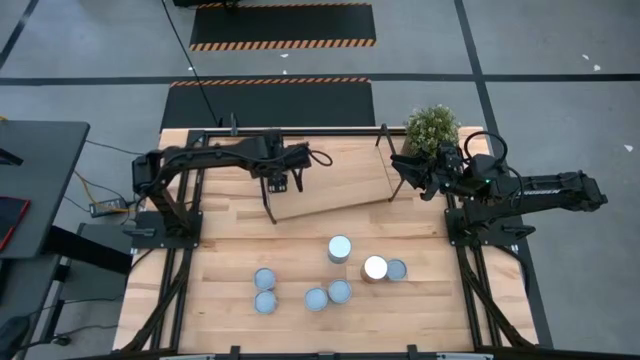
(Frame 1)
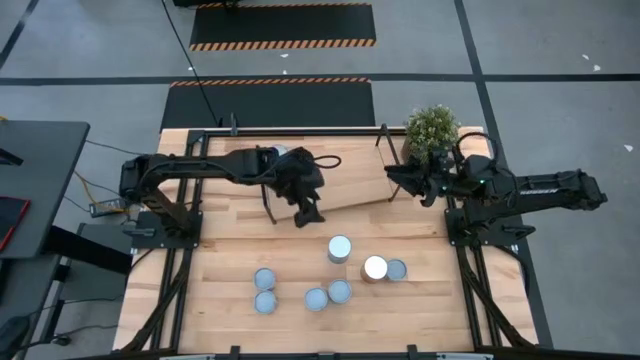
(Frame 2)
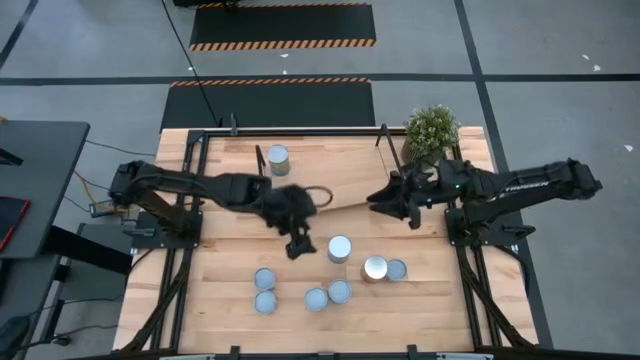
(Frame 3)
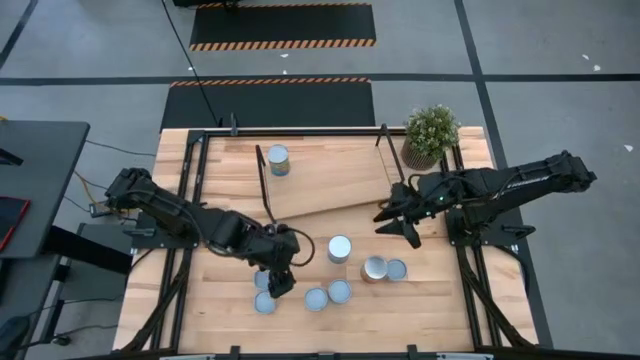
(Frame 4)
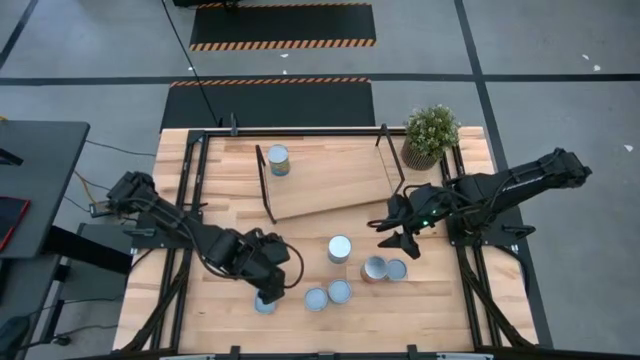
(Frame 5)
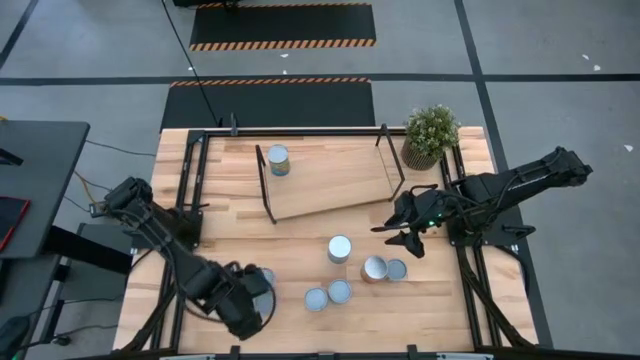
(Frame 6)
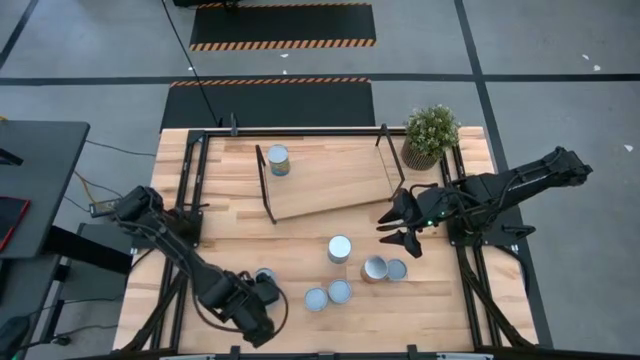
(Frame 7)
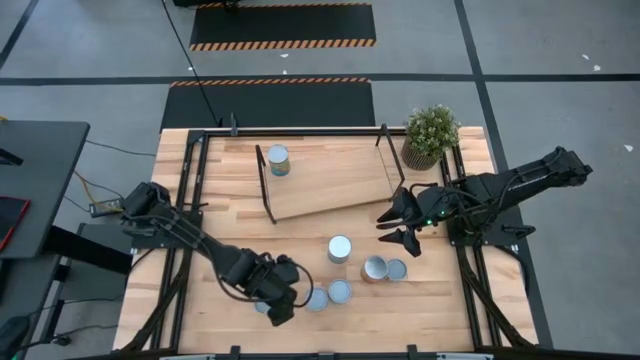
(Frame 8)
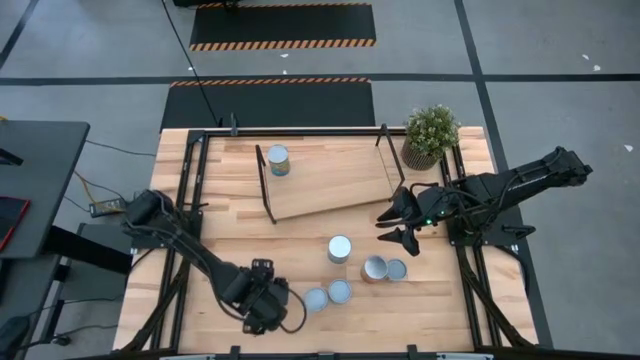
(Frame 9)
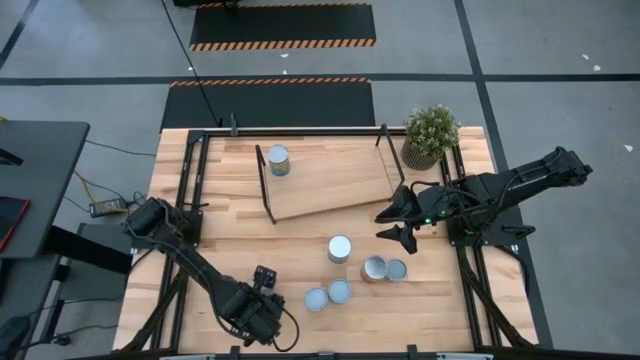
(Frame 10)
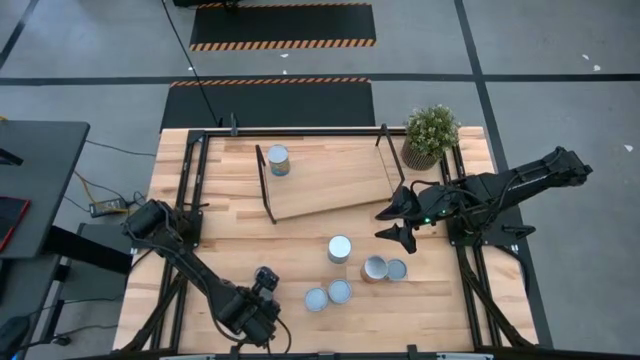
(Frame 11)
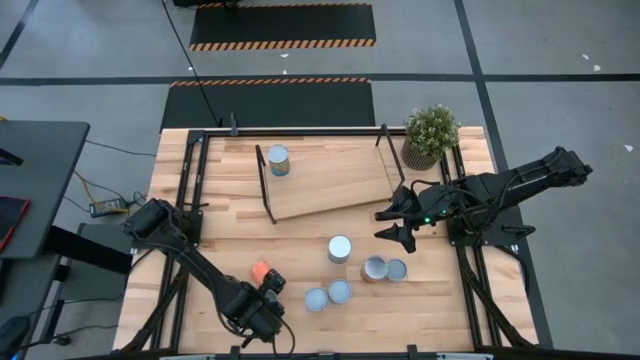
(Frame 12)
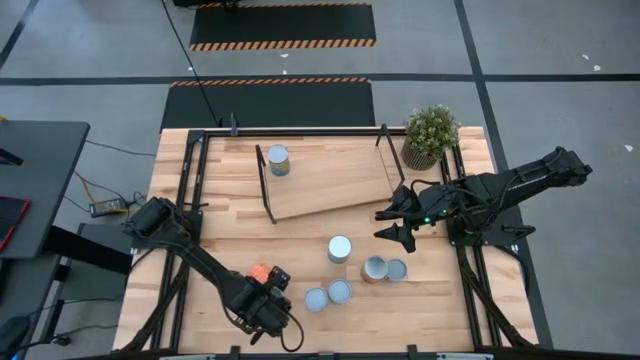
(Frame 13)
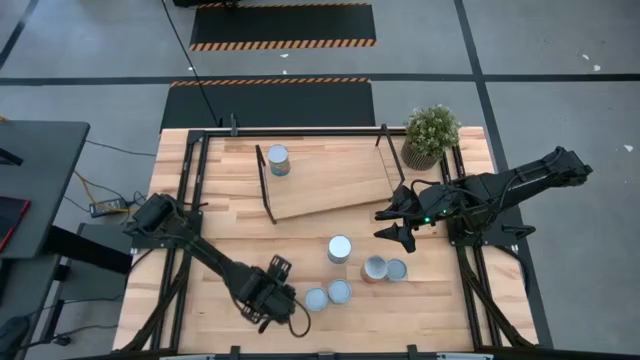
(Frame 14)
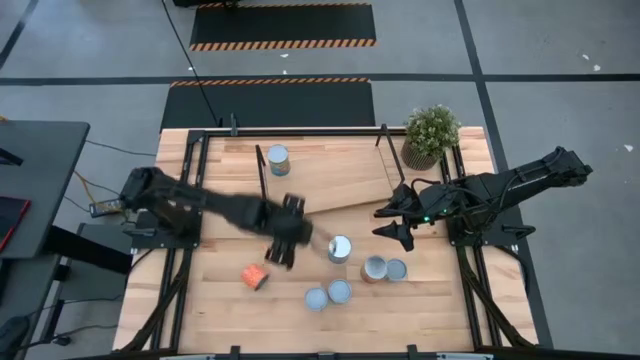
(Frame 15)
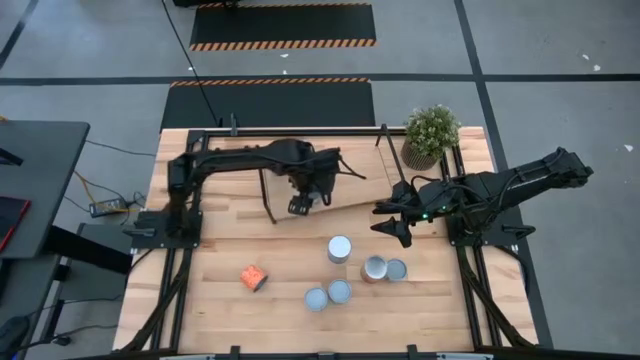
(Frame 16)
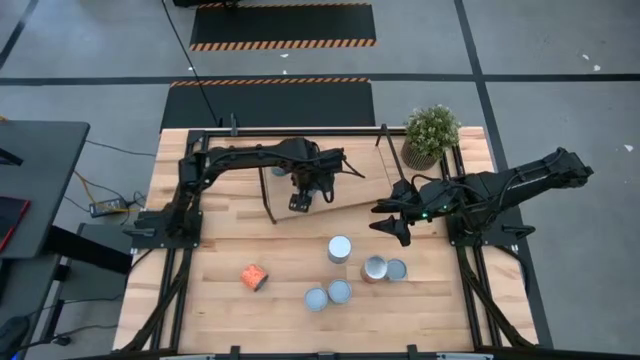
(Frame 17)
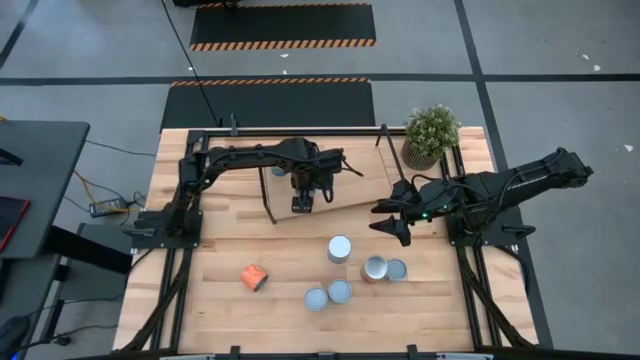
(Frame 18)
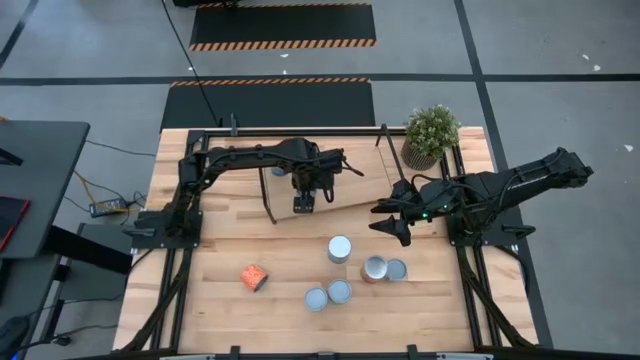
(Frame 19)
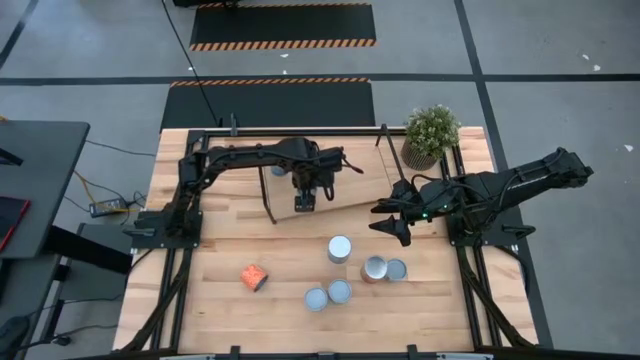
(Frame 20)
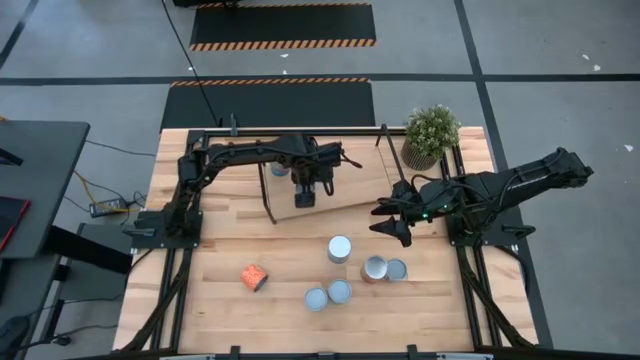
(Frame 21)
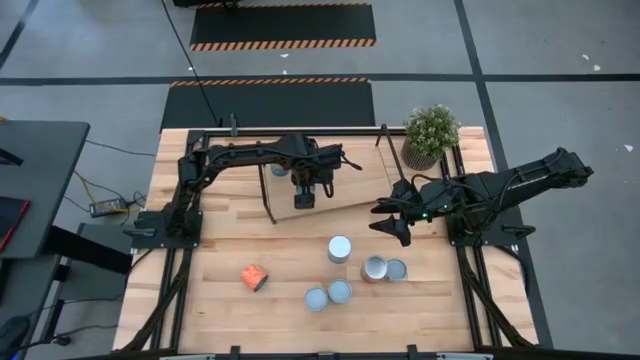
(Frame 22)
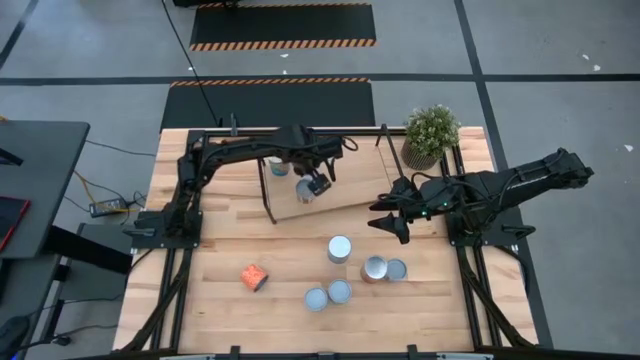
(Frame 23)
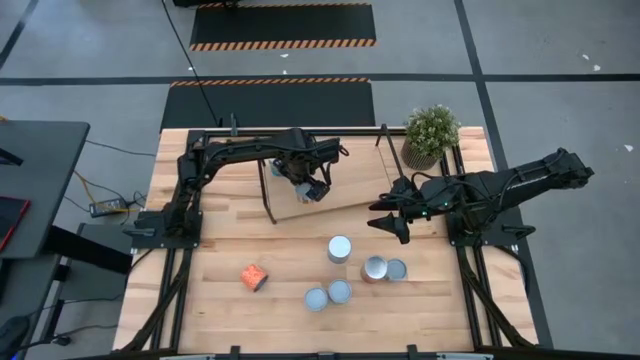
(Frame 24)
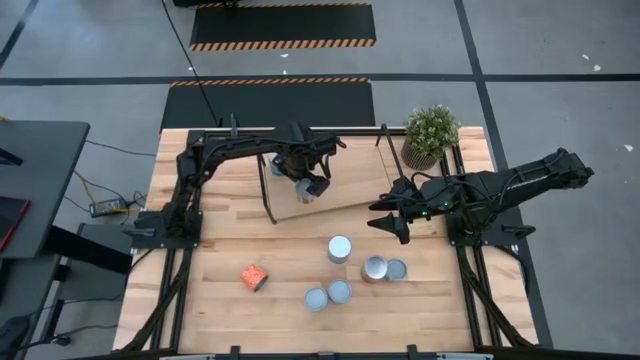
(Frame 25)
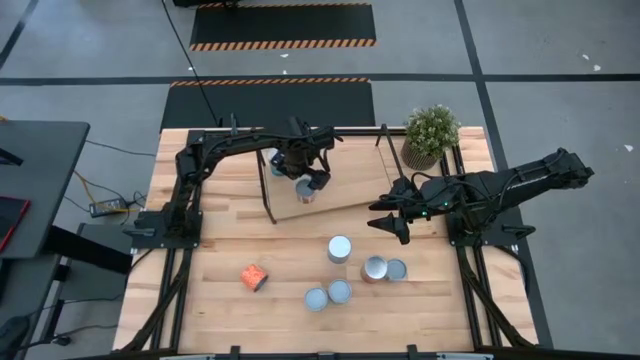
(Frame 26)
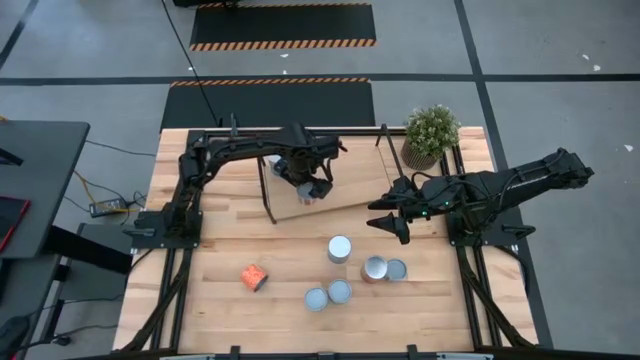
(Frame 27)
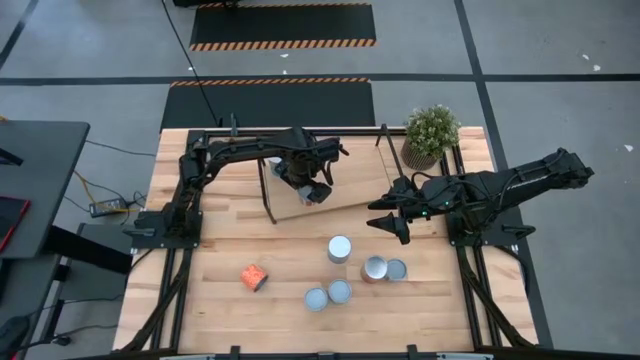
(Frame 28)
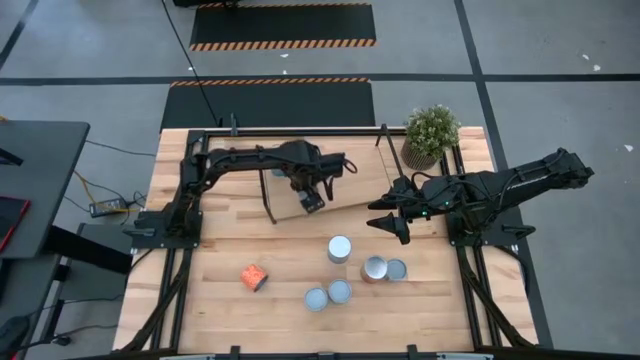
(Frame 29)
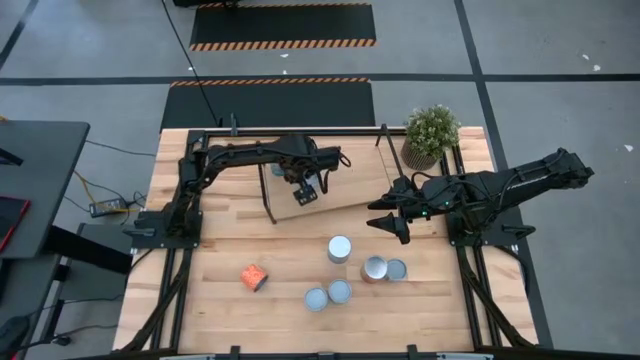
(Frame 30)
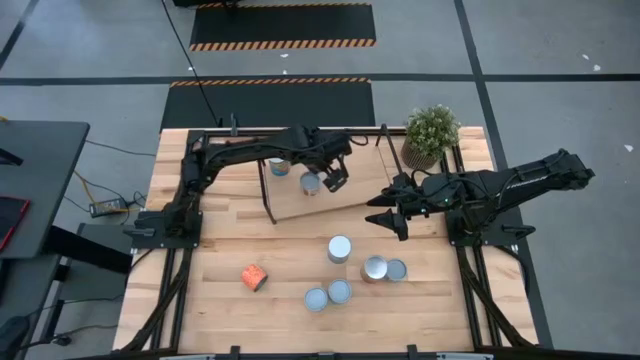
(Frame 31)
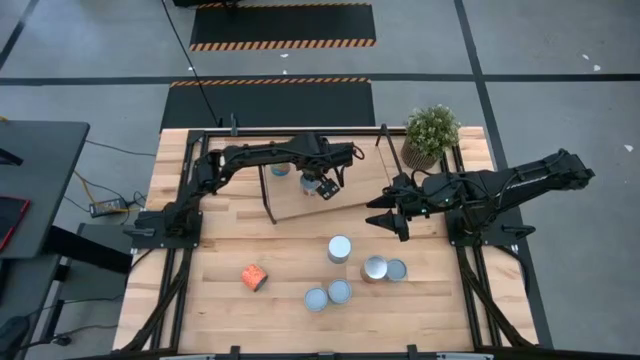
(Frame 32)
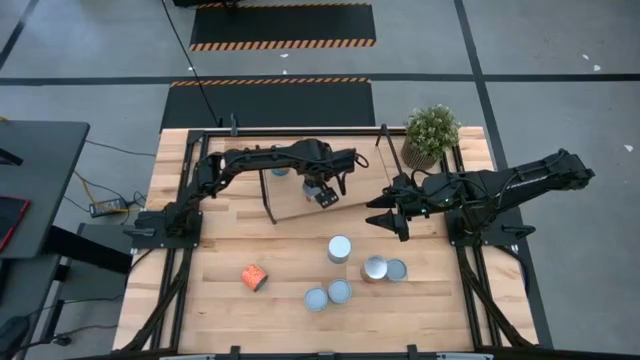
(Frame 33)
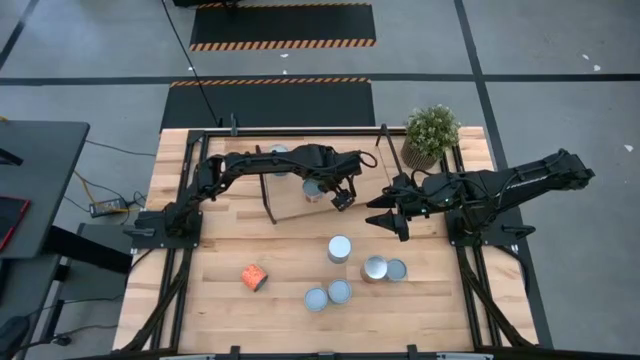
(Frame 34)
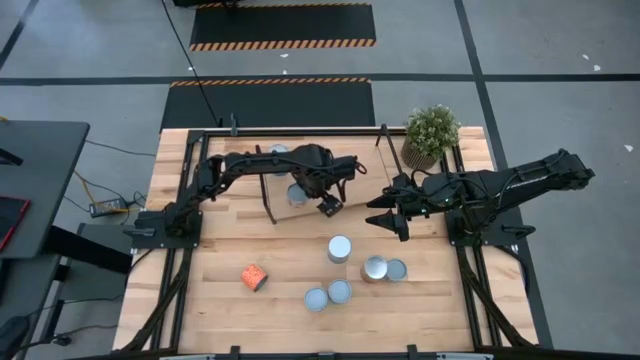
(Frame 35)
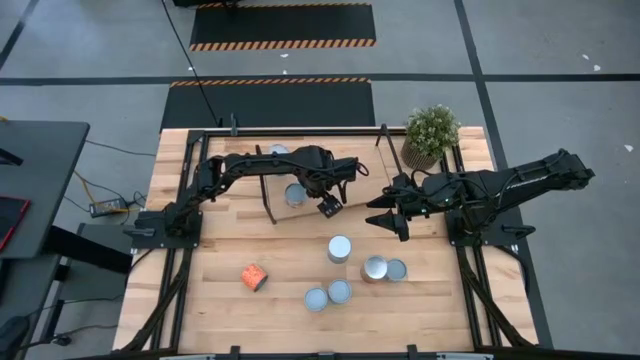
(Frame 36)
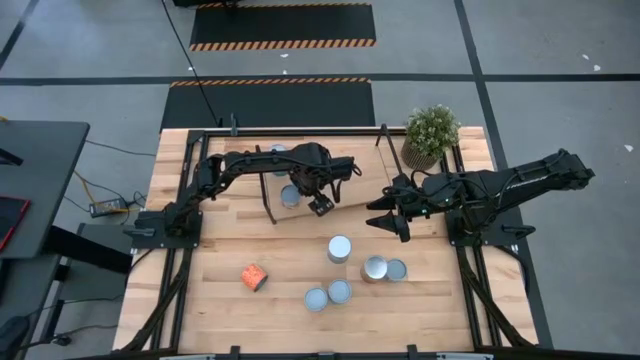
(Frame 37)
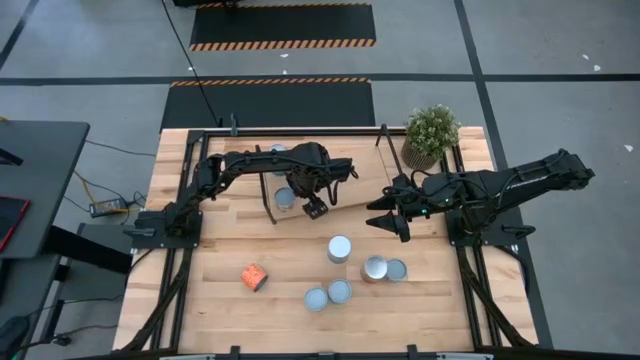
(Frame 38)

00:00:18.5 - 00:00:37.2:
Task: Pick and place cans onto a shelf
Put the canned diced tomatoes on the shelf
